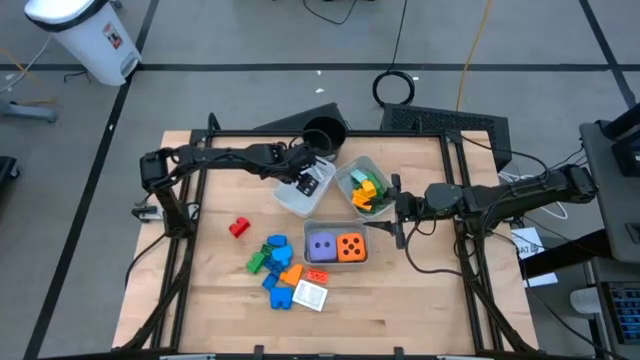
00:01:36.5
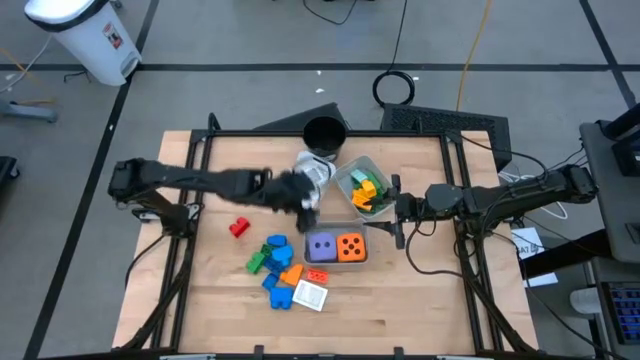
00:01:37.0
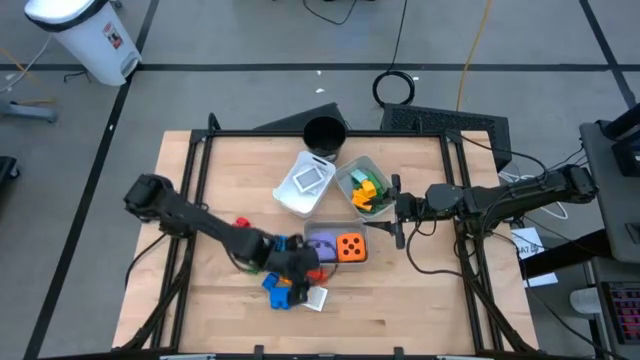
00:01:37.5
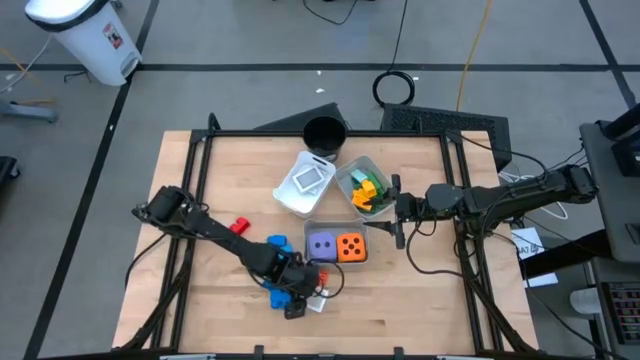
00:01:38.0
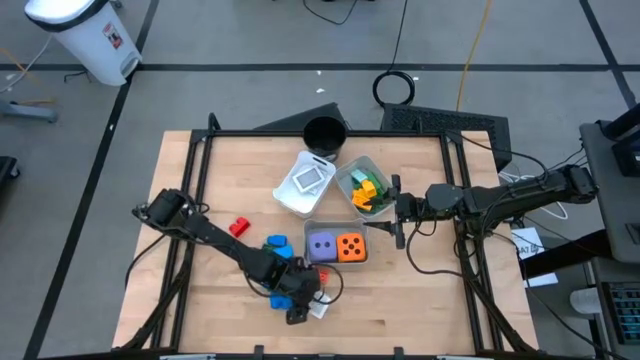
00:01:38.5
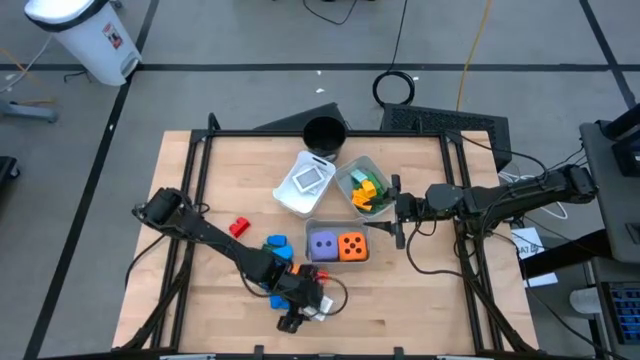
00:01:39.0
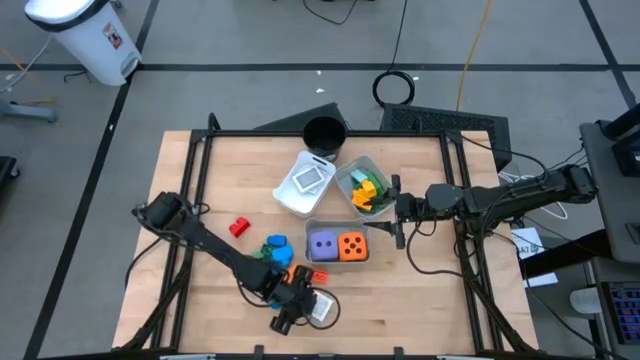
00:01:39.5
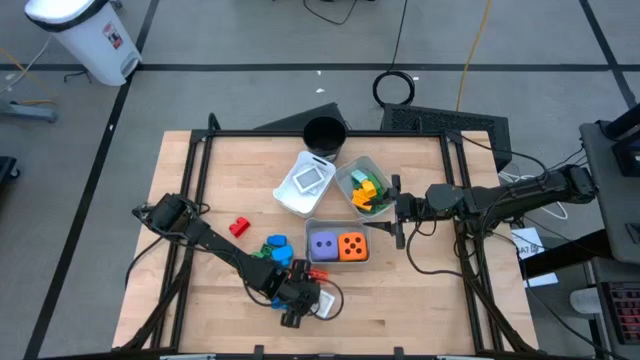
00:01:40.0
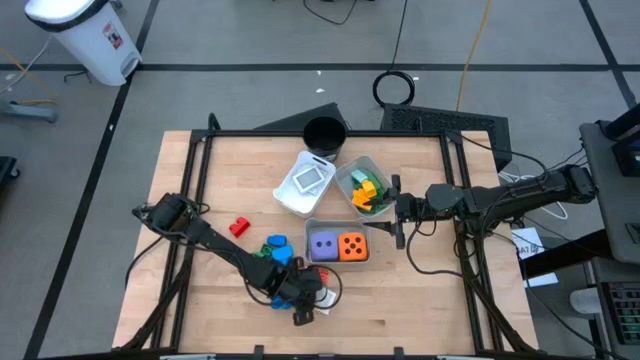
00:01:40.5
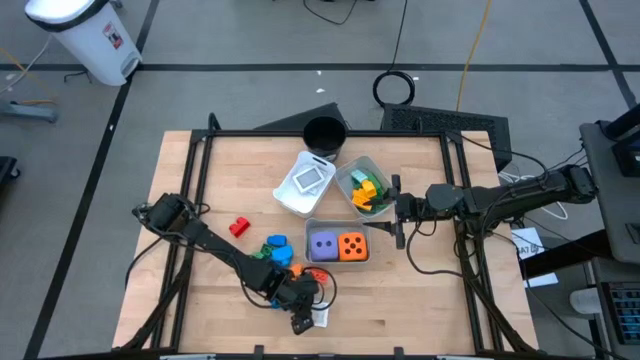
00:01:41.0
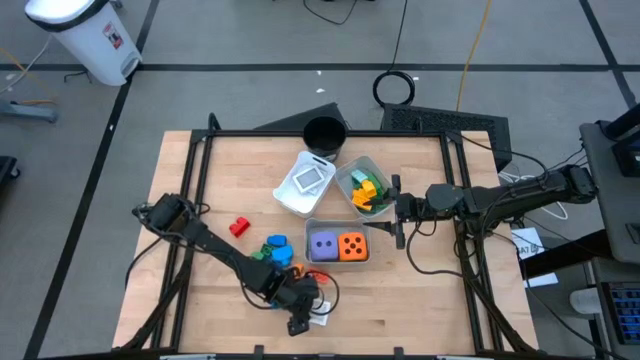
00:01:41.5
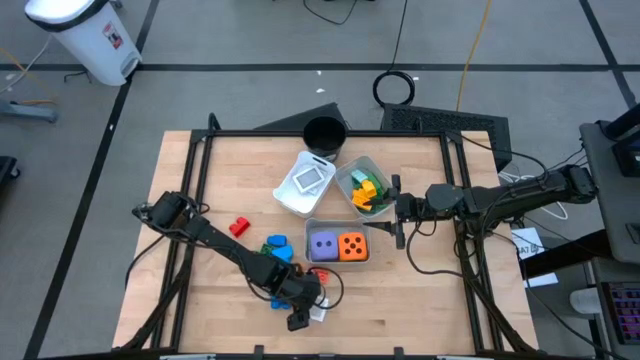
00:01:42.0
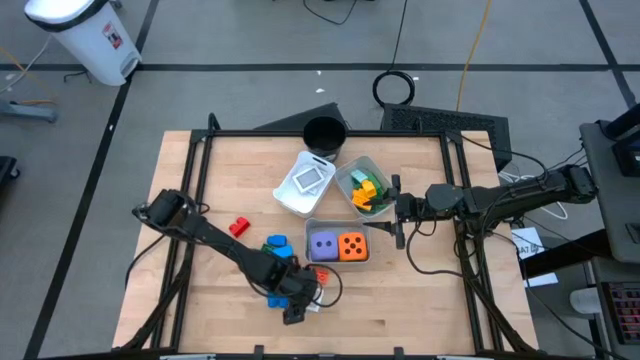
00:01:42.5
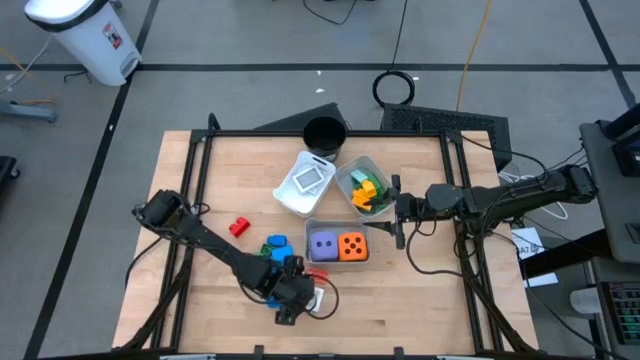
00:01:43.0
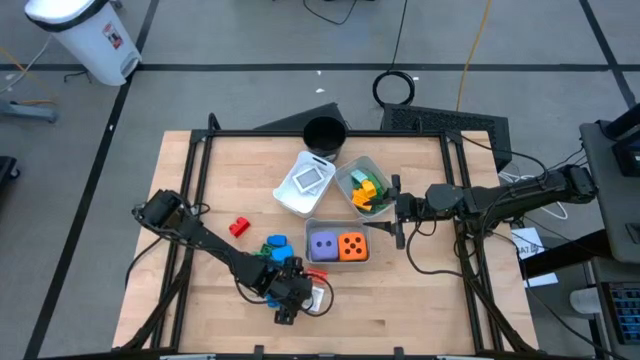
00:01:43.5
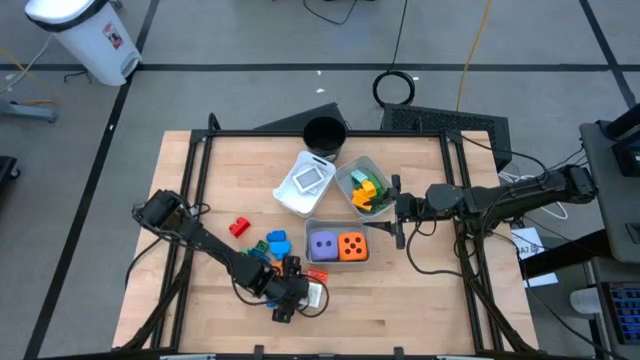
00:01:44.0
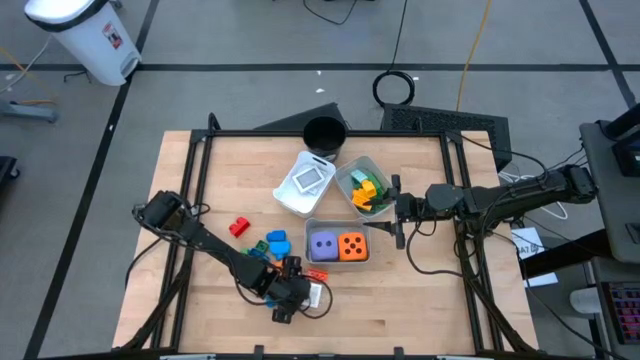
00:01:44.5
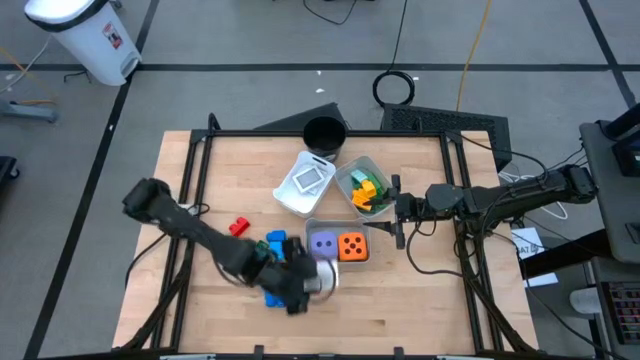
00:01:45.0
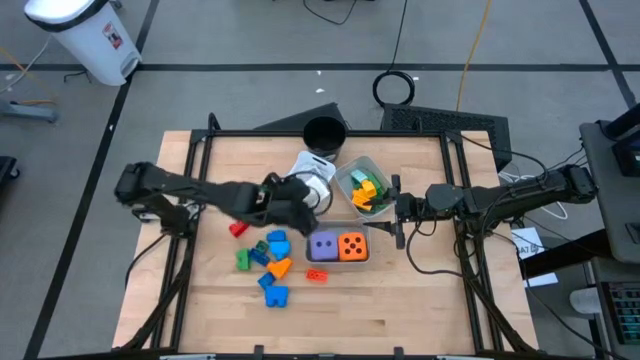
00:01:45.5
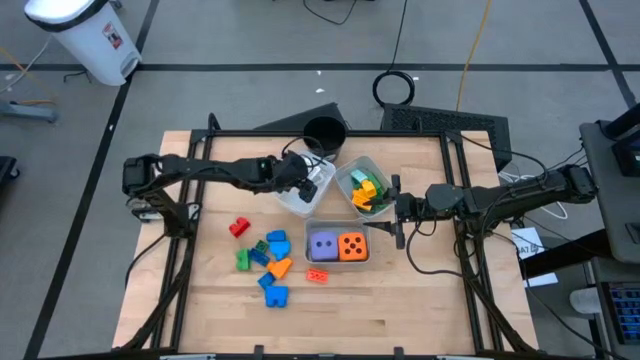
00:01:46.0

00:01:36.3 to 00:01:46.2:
Task: Pick & Place Toys
Put the brown deck of cards into the white bin

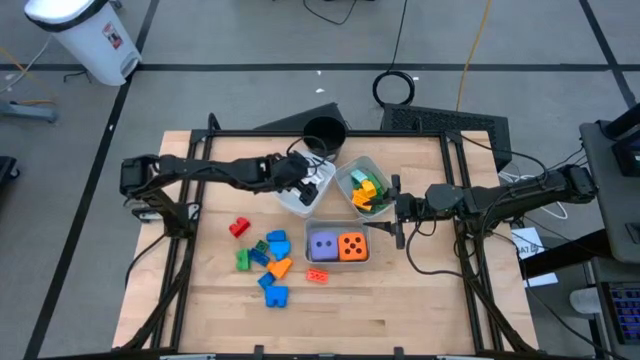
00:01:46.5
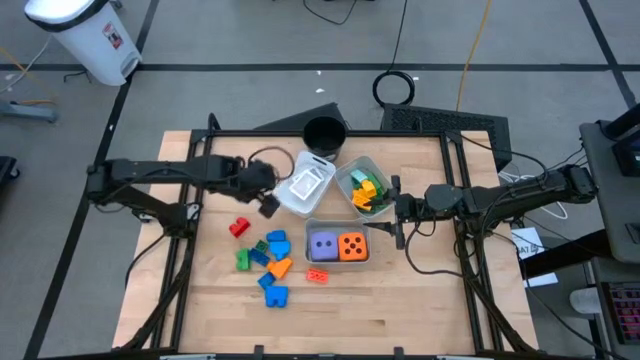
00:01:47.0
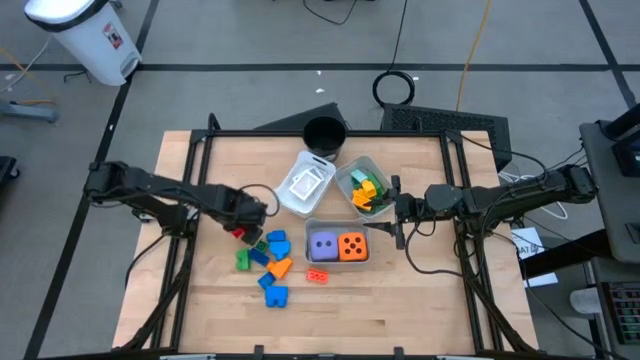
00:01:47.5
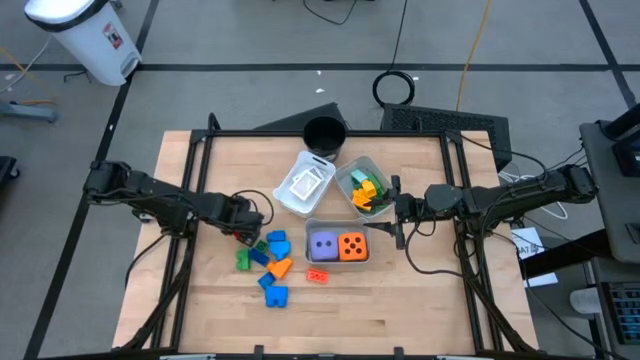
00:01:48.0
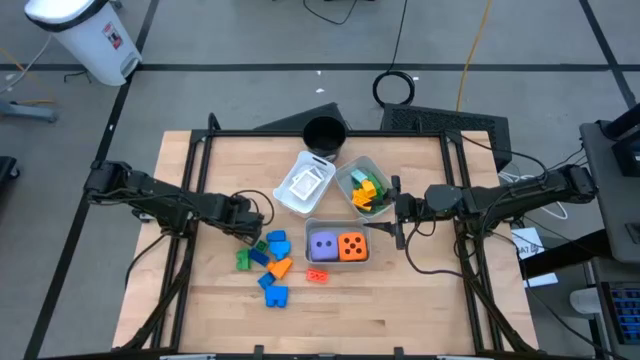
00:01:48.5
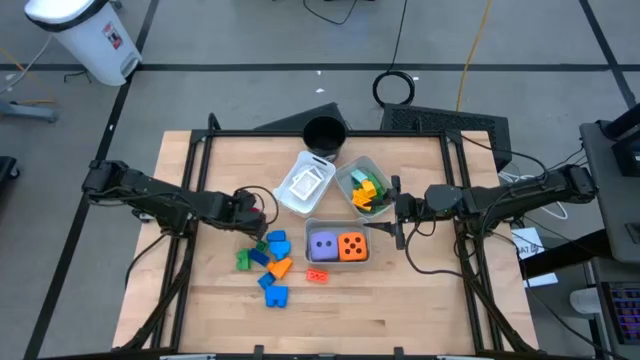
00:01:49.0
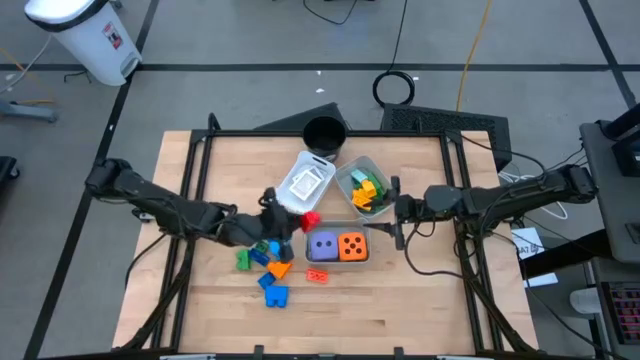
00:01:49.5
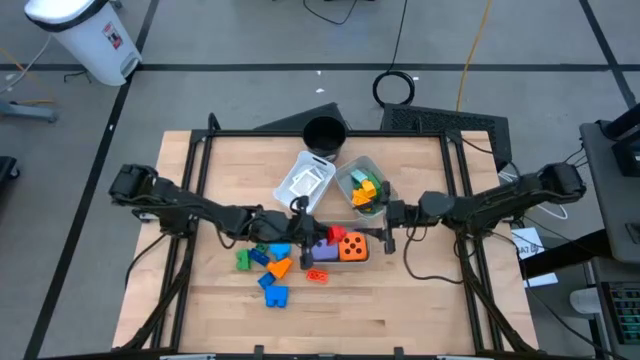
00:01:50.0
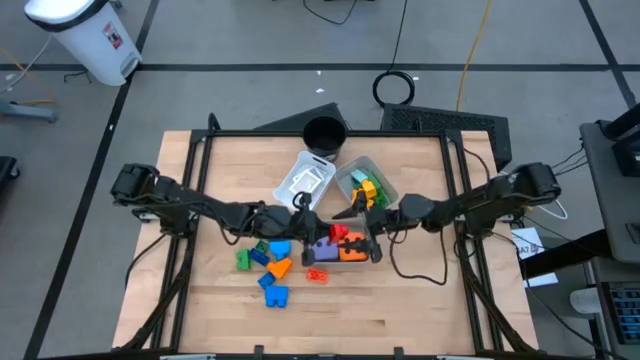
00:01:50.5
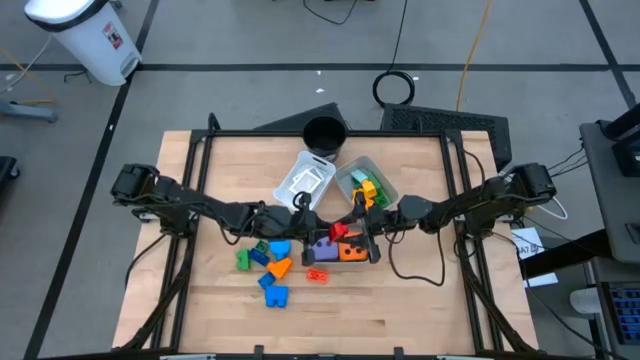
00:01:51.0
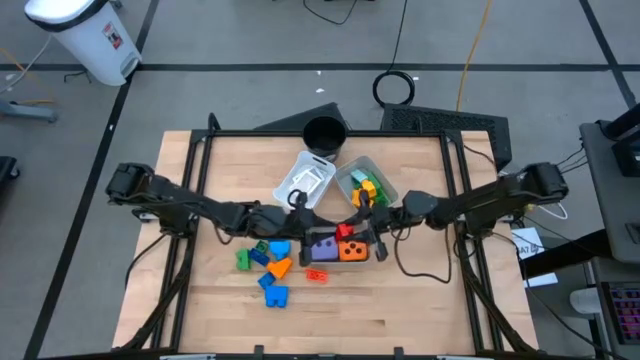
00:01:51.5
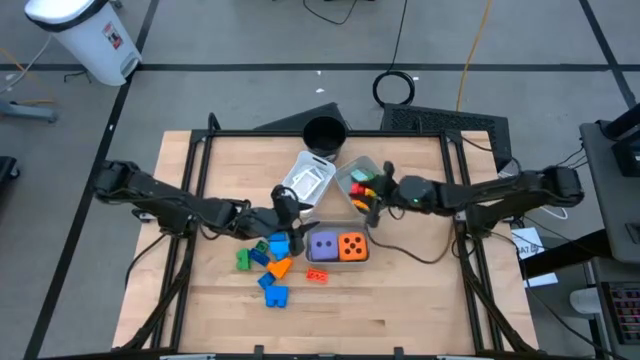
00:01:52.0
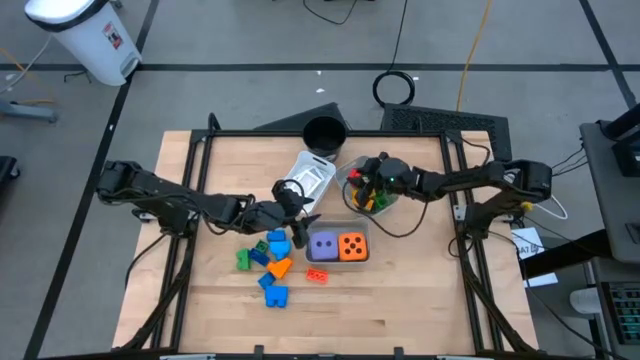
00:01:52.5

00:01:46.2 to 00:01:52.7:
Put the red game piece into the top gray bin

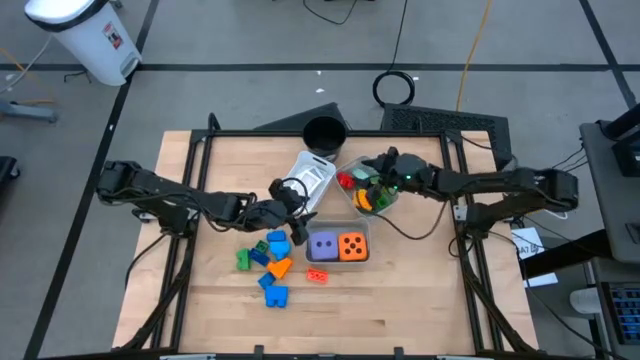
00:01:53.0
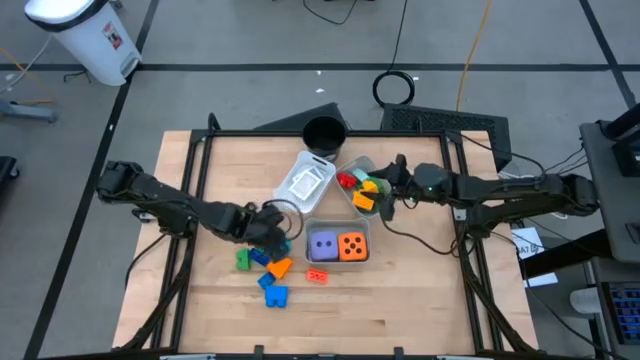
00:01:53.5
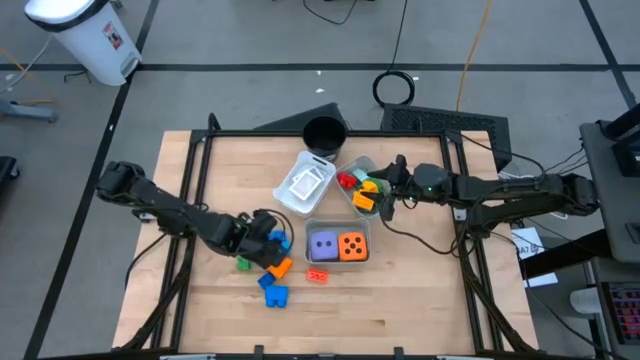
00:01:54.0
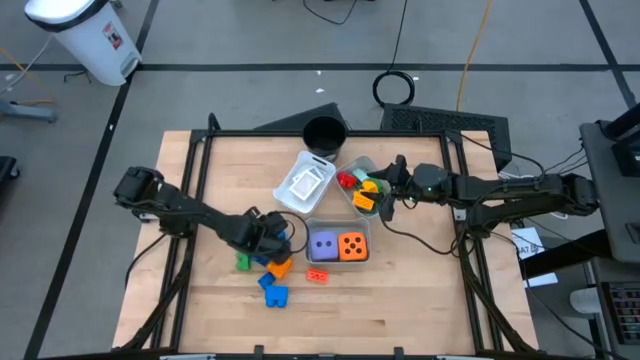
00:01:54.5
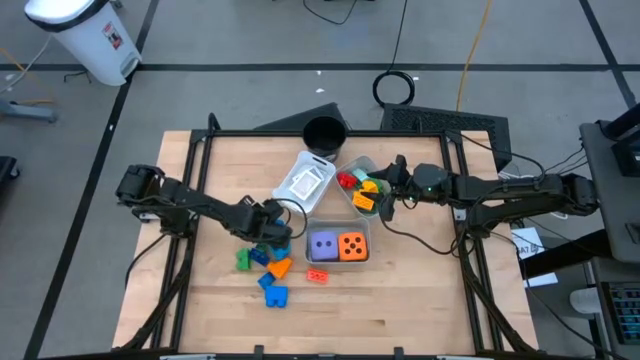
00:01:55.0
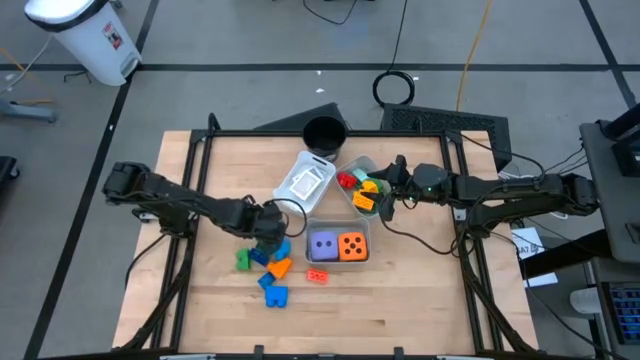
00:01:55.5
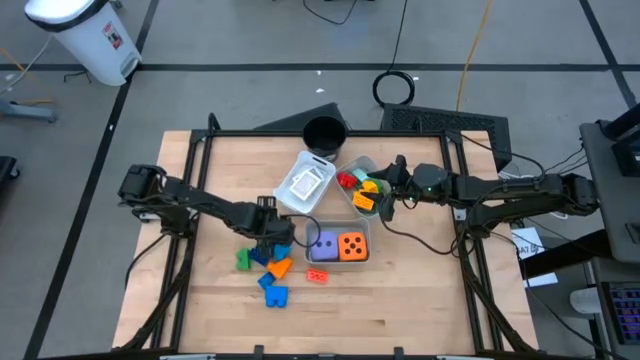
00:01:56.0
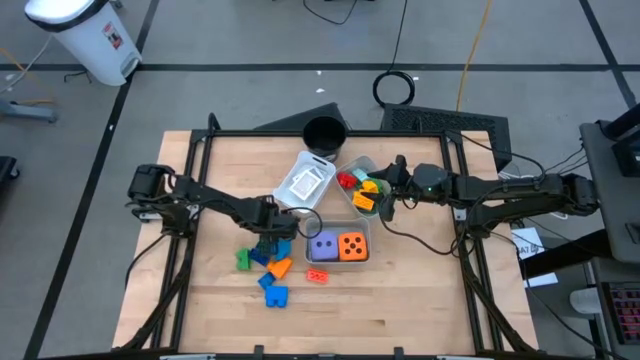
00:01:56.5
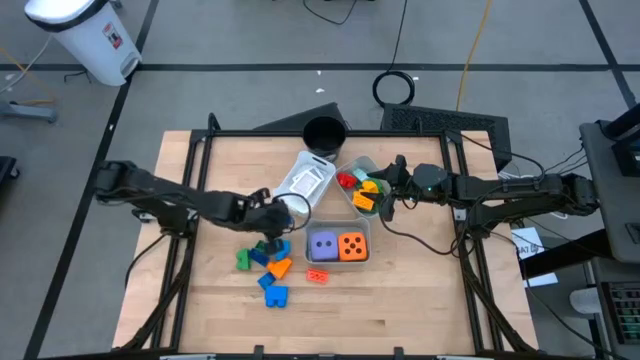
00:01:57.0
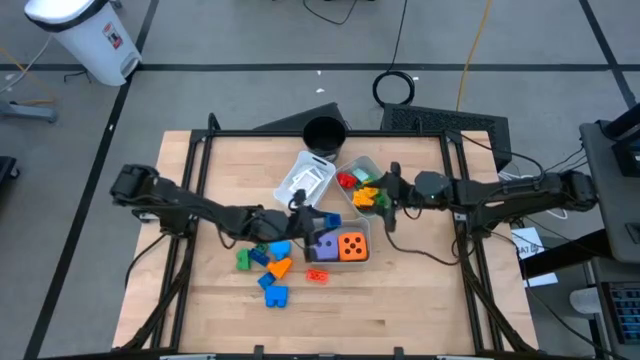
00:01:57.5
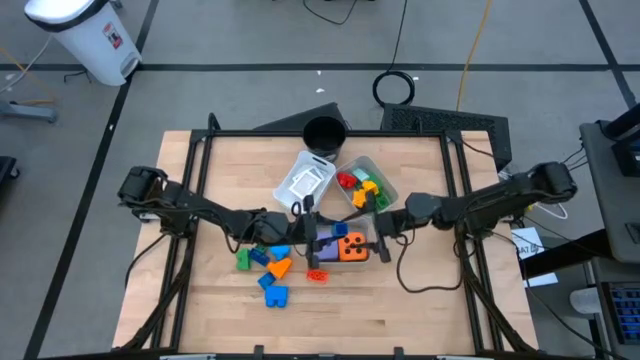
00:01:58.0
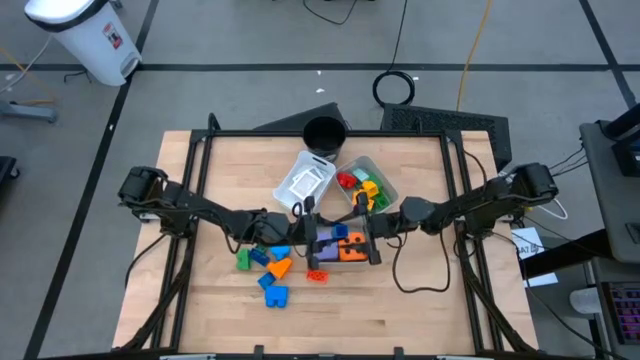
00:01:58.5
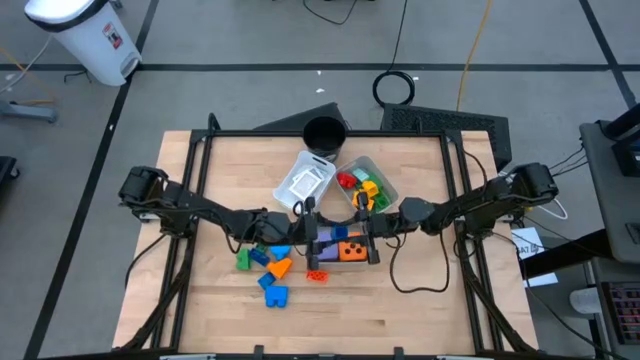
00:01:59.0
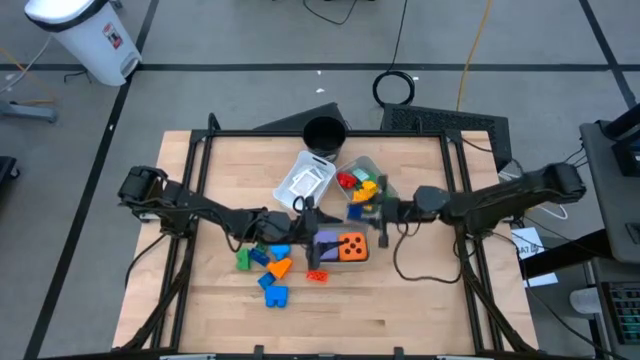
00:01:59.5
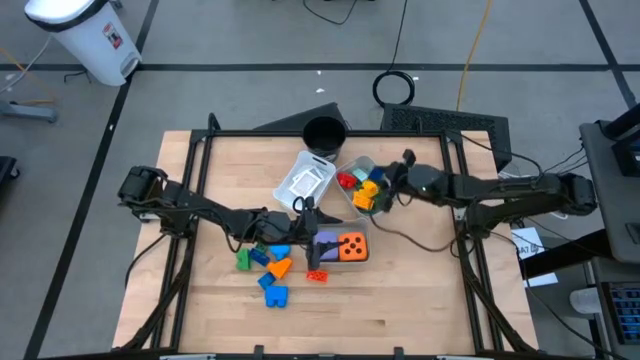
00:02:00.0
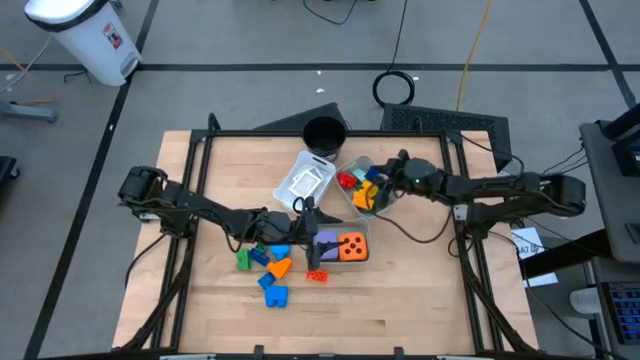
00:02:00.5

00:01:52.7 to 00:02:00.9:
Put the dark blue game piece into the top gray bin
